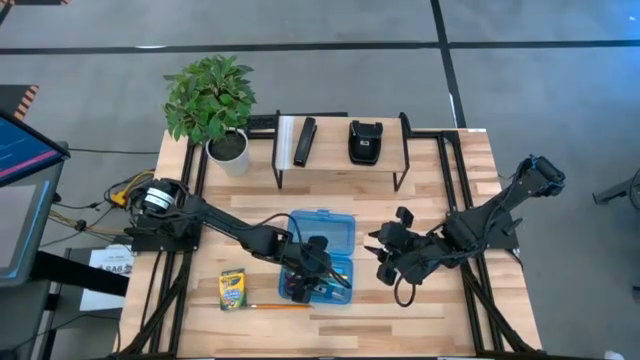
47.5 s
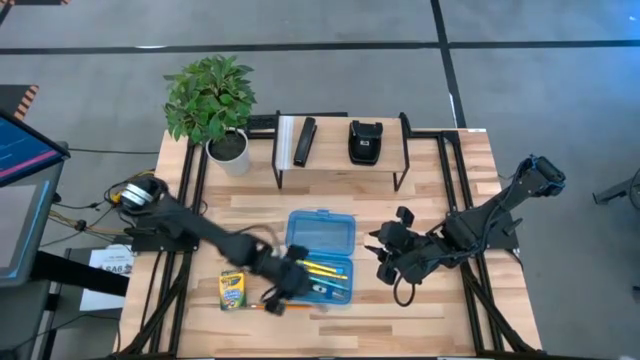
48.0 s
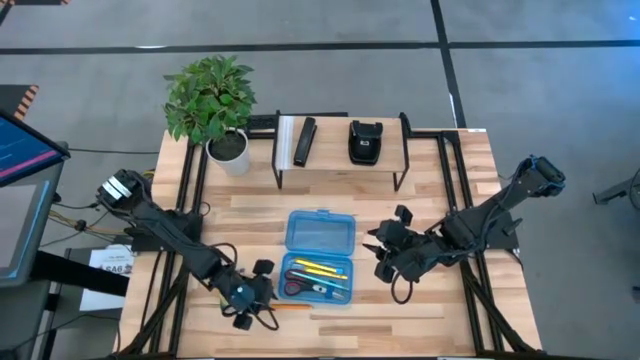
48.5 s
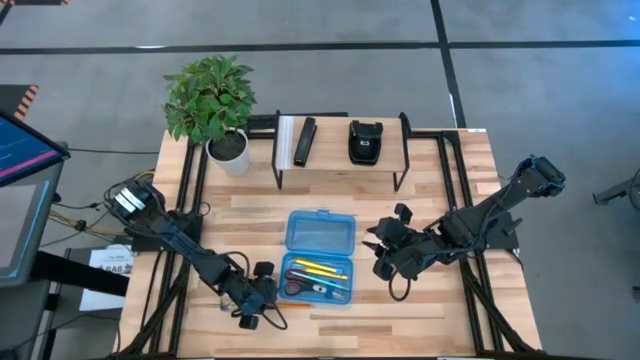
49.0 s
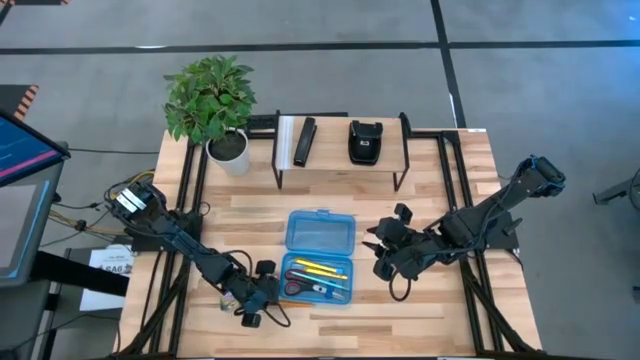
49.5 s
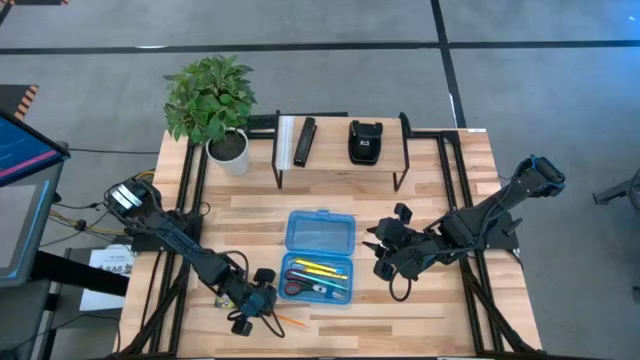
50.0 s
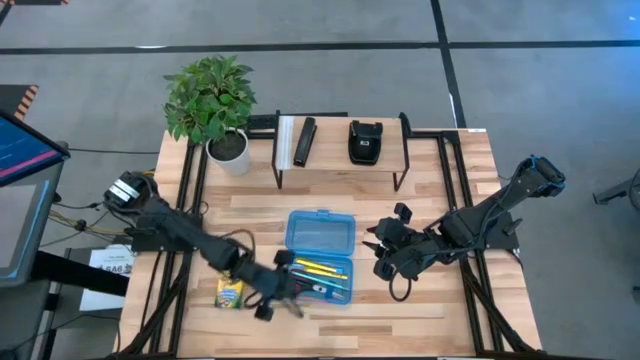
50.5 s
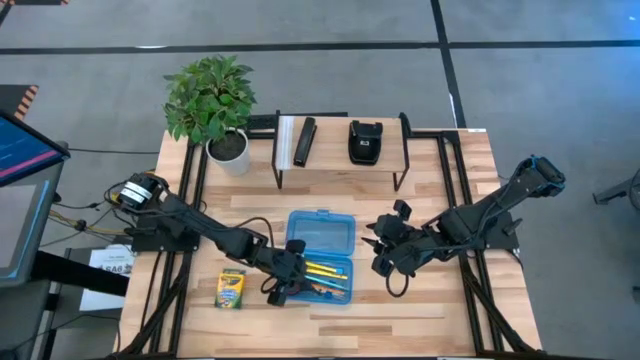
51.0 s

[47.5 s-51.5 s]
Task: Pack school essentials
Put the orange pencil into the supply box

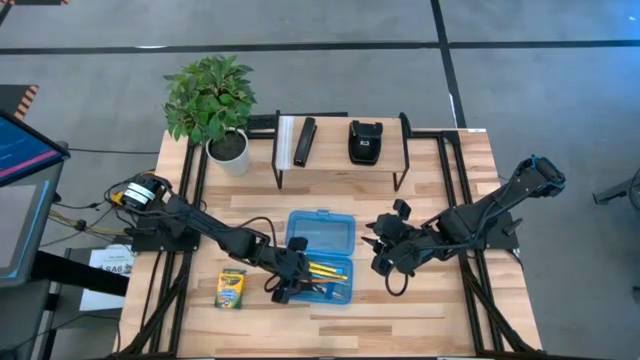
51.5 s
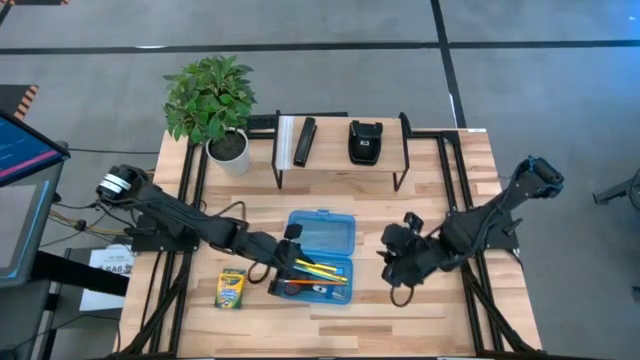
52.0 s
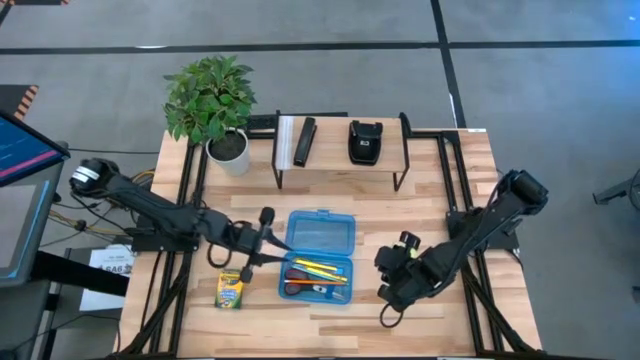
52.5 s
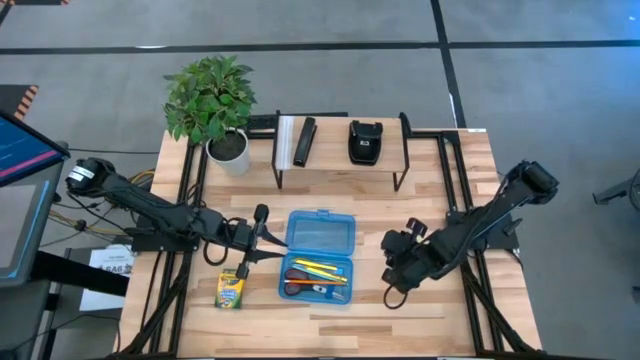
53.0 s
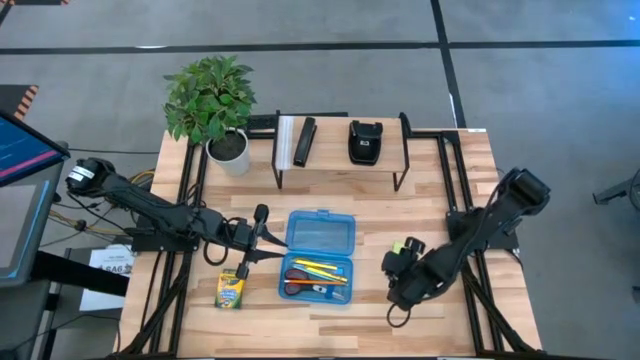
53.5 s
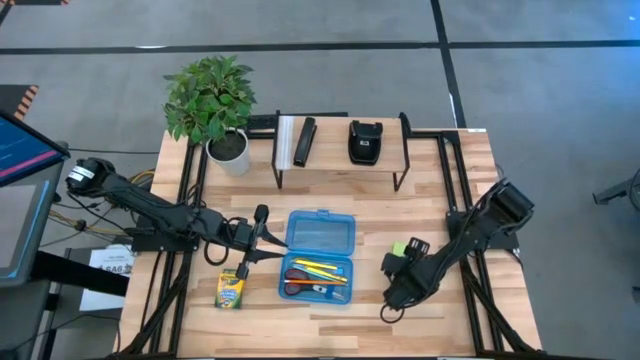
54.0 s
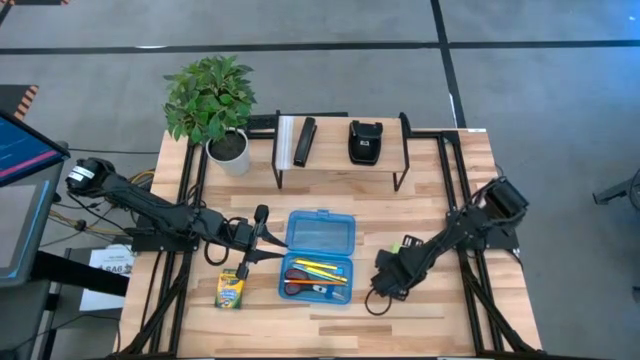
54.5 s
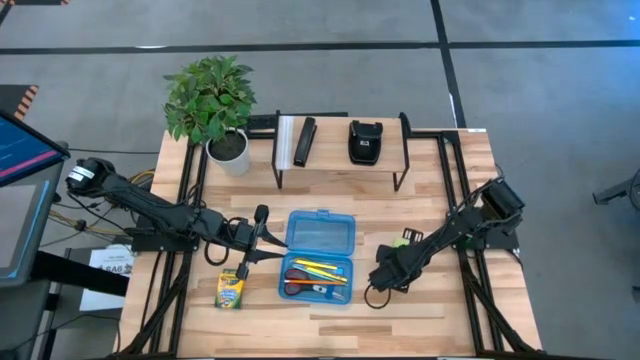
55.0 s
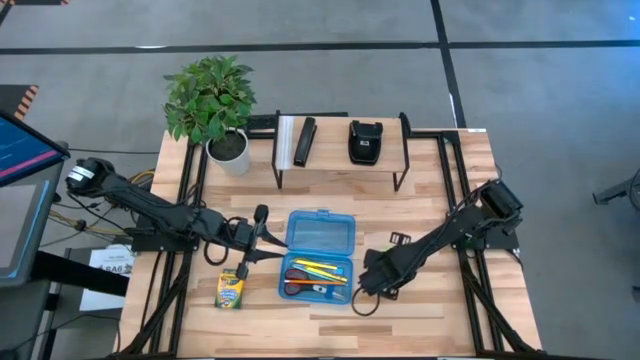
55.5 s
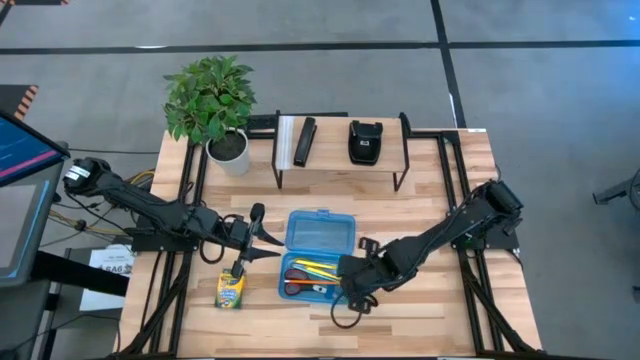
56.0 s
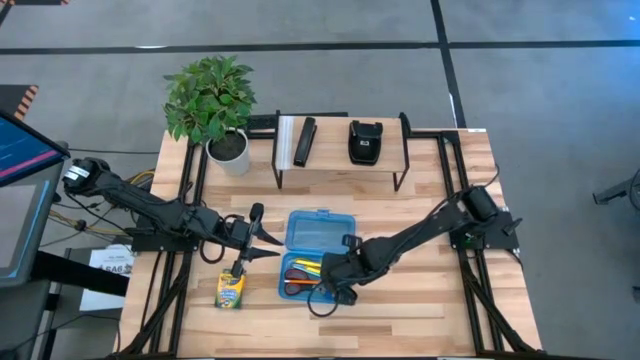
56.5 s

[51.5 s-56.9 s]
Put the lime green sticky note pad into the supply box

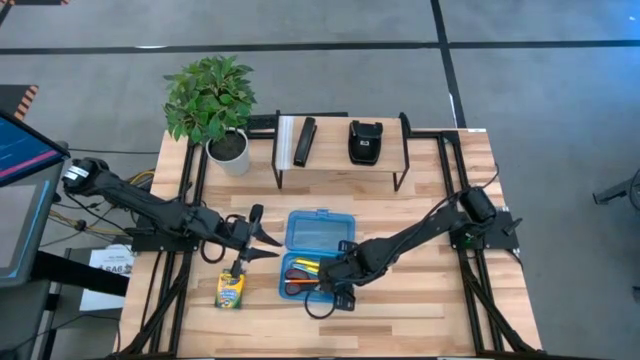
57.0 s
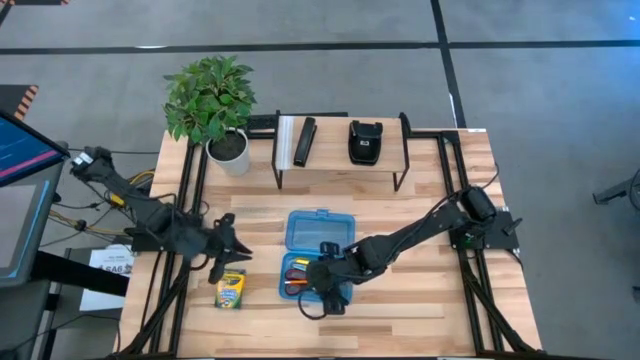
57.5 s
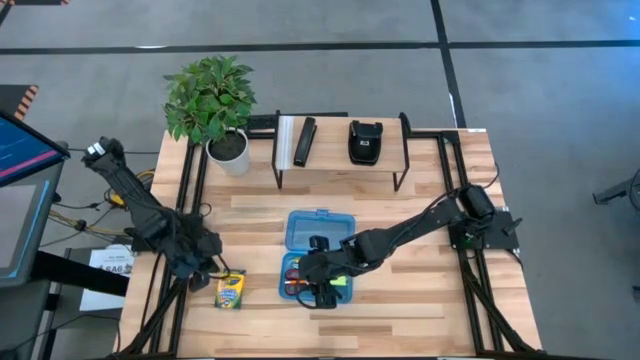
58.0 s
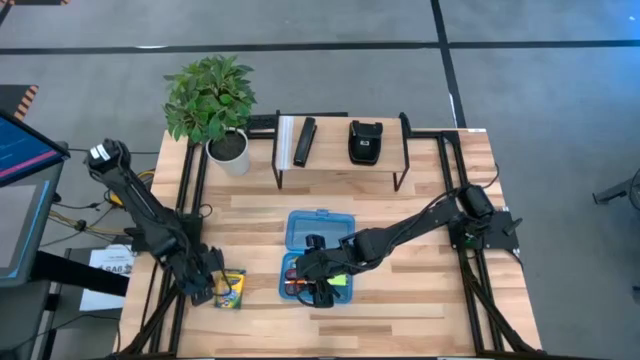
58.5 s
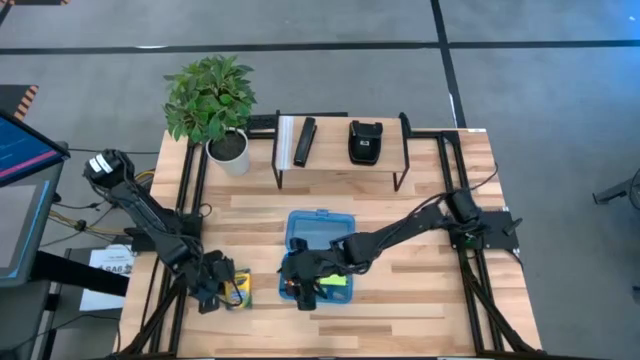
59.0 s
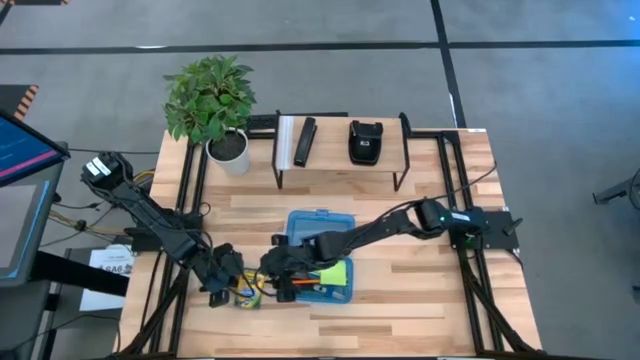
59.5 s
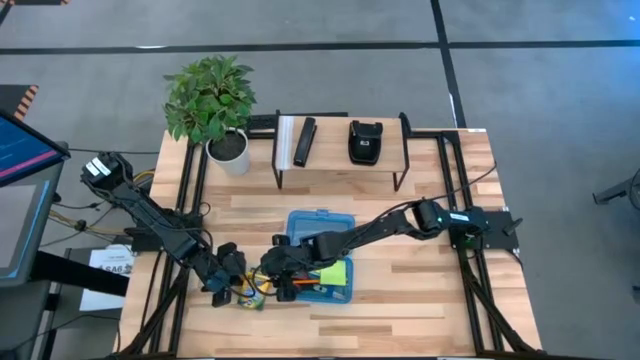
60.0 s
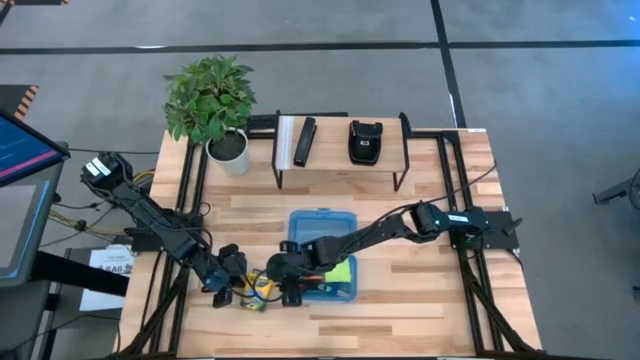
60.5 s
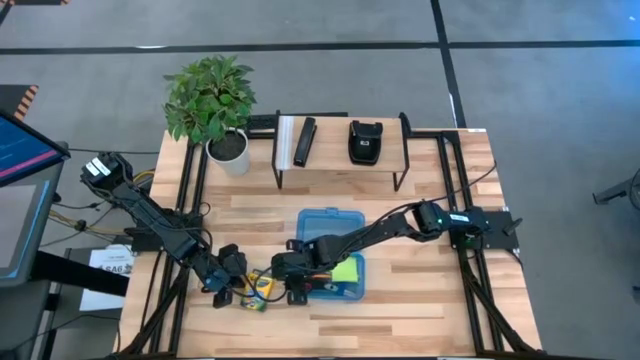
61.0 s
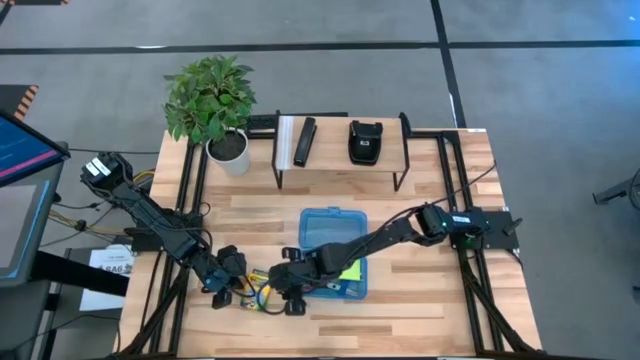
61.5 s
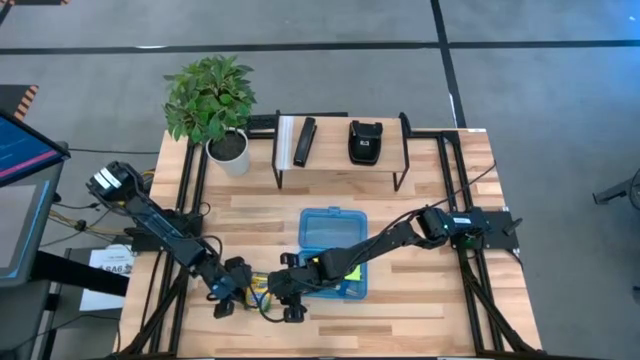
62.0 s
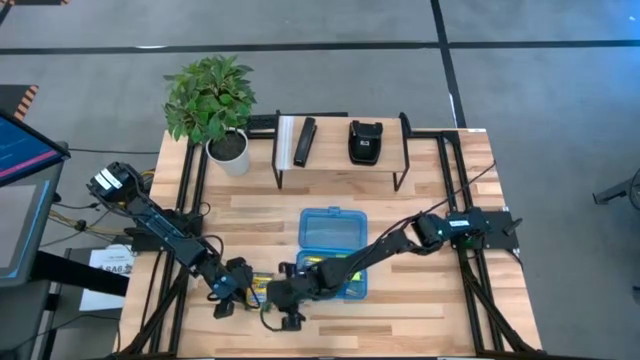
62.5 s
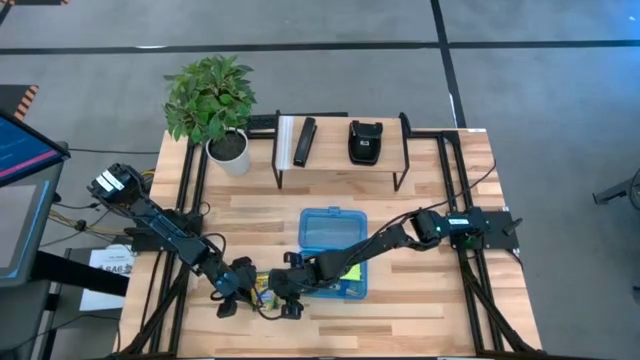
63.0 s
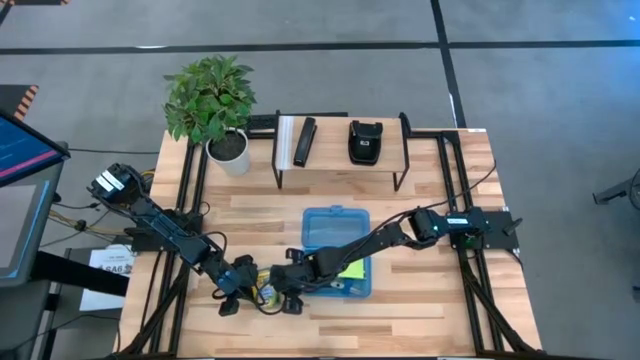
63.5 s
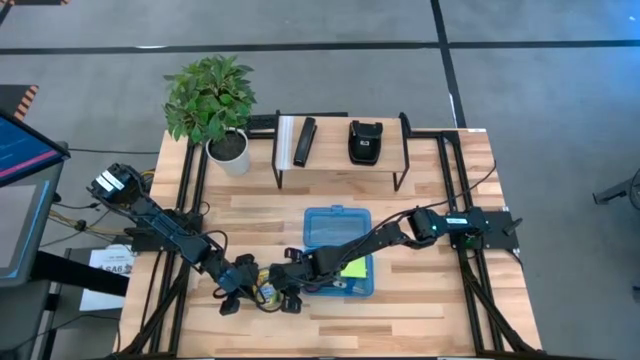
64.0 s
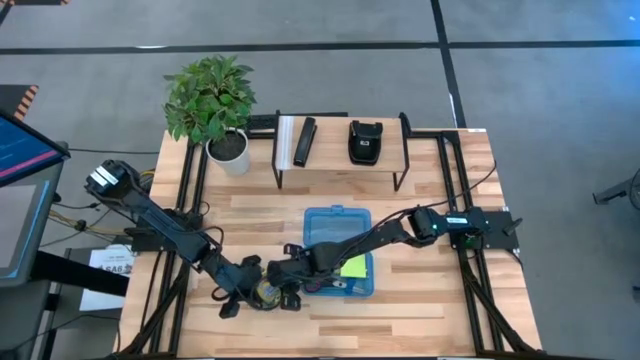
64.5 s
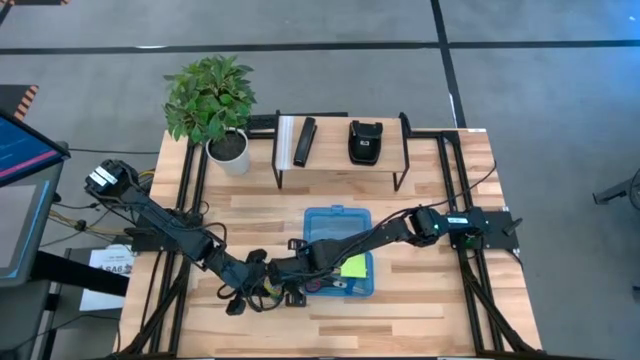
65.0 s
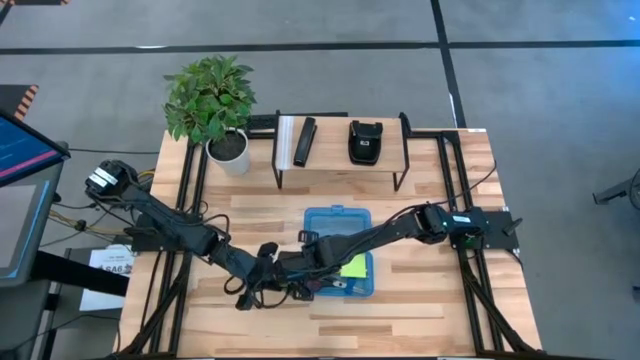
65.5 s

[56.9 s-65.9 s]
Put the box of crayons into the supply box

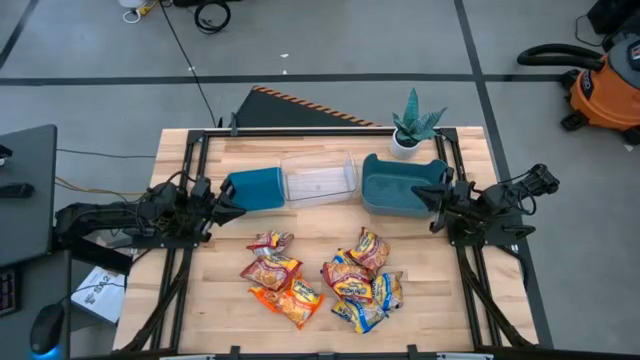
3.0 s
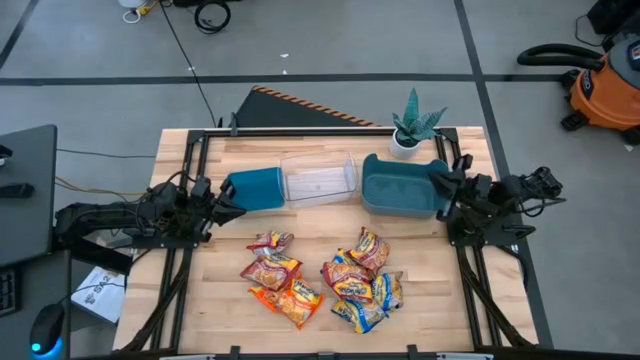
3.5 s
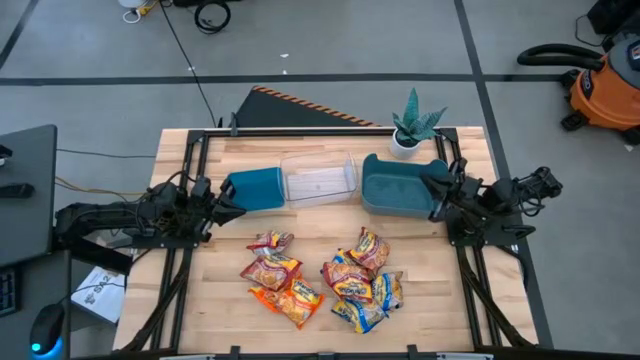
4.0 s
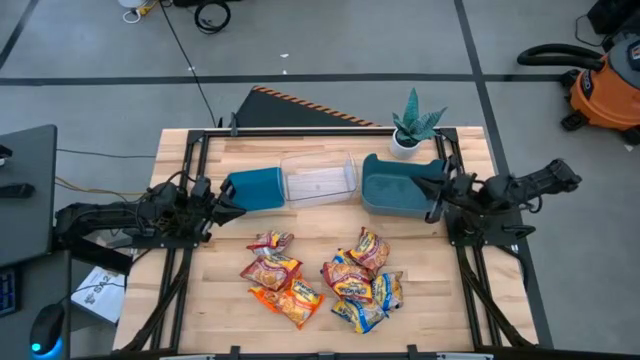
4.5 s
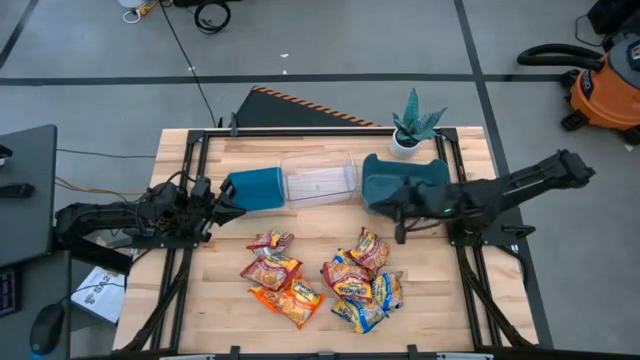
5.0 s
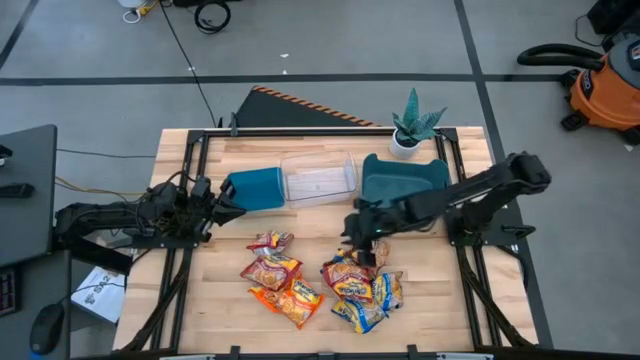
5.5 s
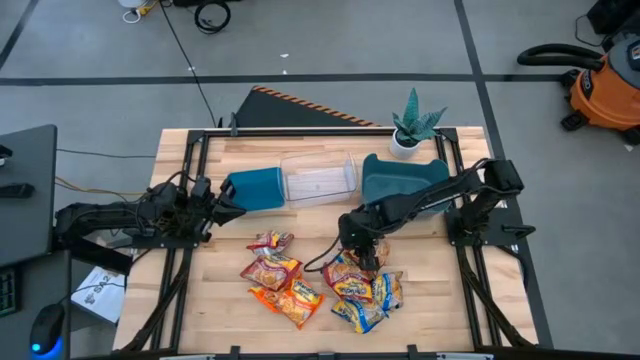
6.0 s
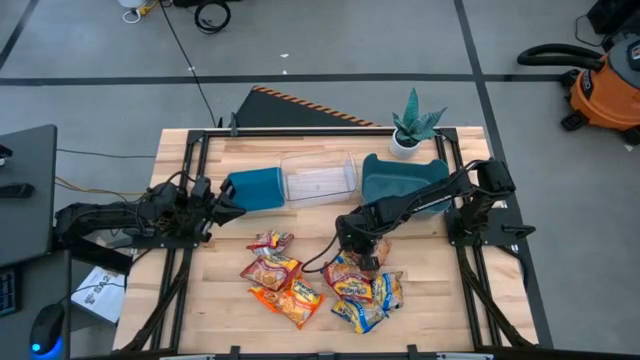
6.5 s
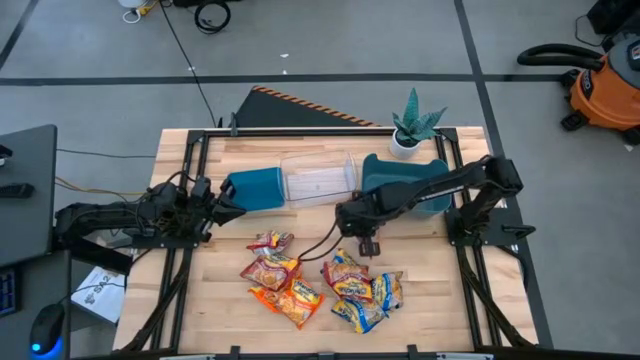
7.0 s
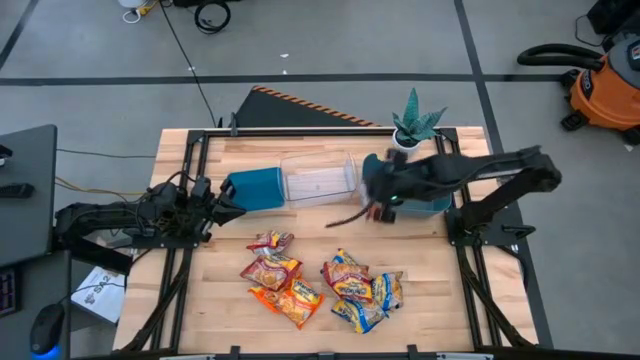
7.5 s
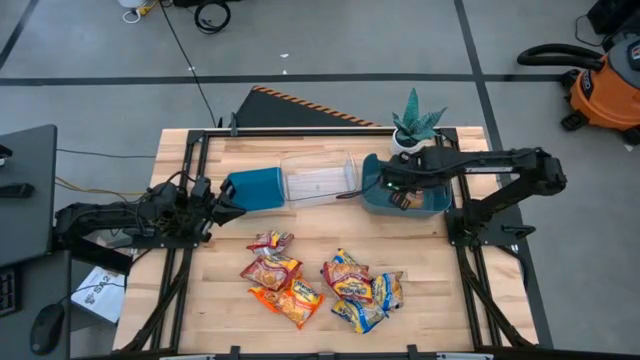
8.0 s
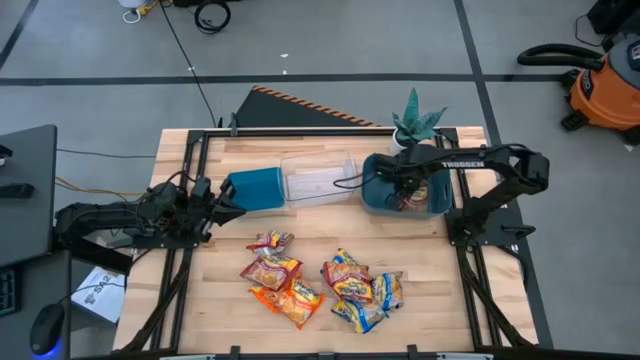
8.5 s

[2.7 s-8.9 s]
Task: Sort Maruchan noodles
Put the top right red noddle pack into the dark blue bin
